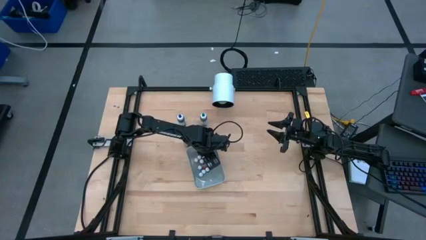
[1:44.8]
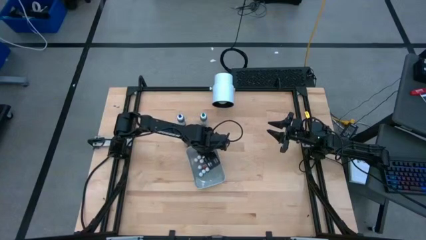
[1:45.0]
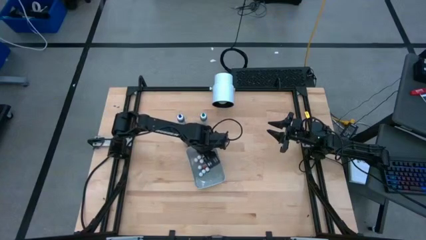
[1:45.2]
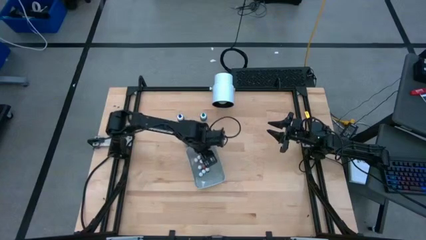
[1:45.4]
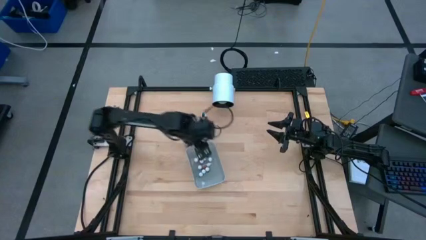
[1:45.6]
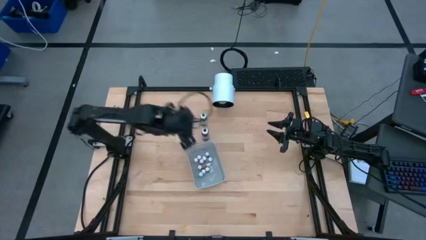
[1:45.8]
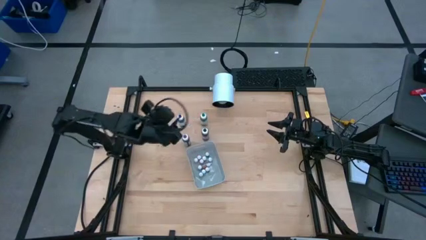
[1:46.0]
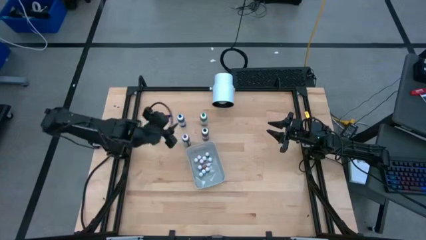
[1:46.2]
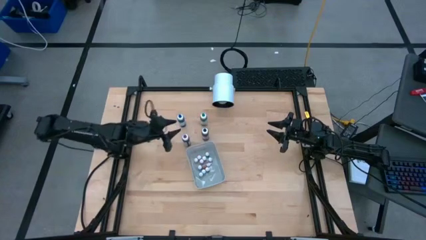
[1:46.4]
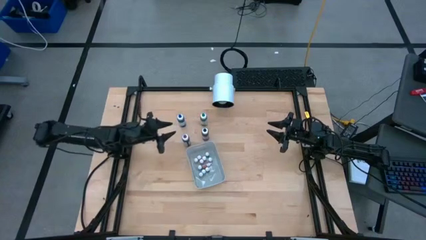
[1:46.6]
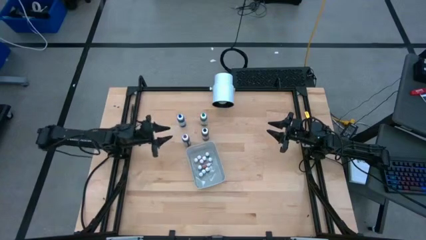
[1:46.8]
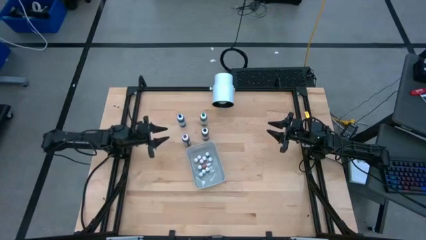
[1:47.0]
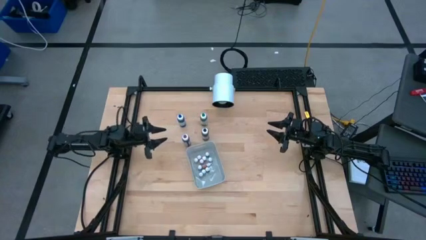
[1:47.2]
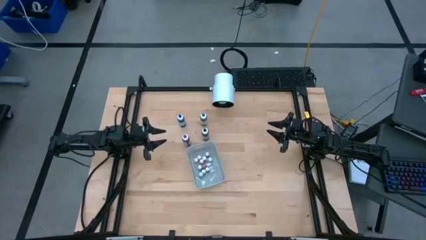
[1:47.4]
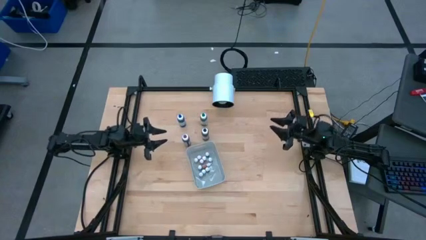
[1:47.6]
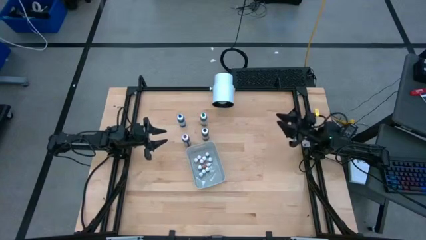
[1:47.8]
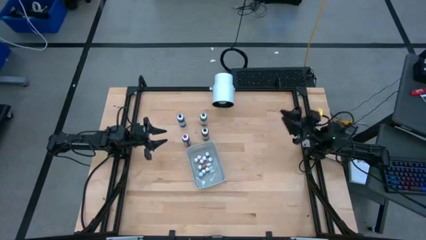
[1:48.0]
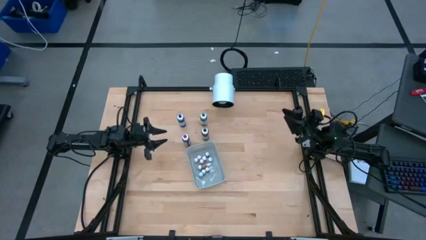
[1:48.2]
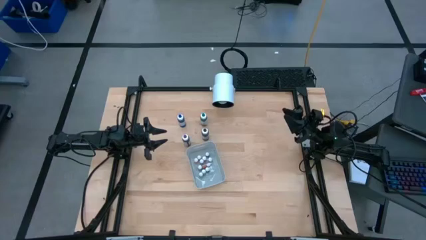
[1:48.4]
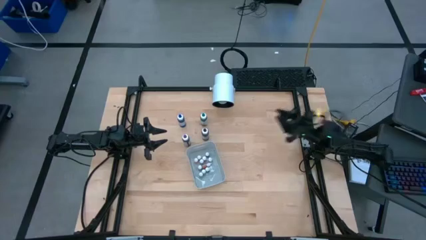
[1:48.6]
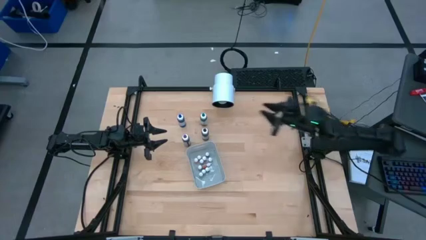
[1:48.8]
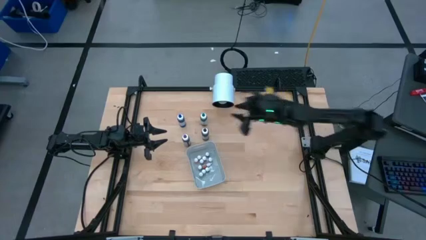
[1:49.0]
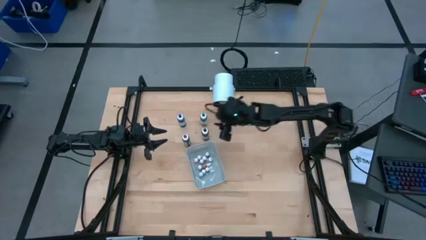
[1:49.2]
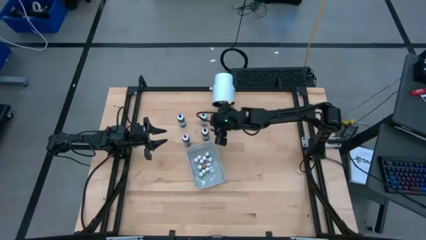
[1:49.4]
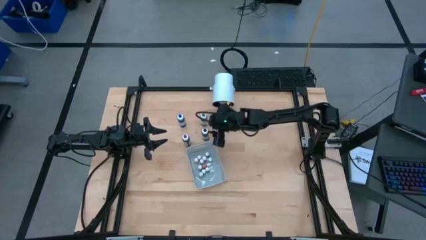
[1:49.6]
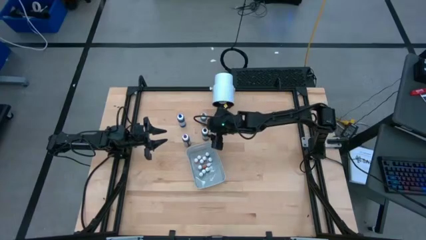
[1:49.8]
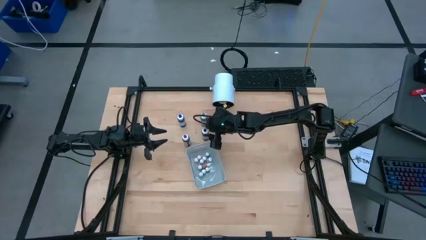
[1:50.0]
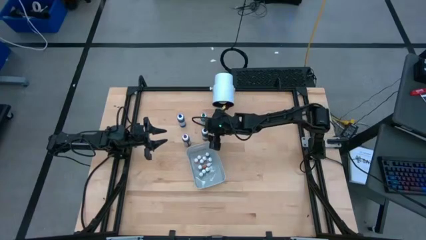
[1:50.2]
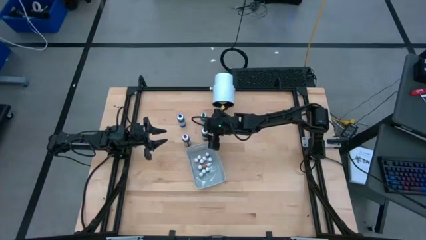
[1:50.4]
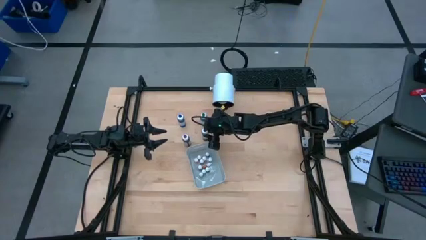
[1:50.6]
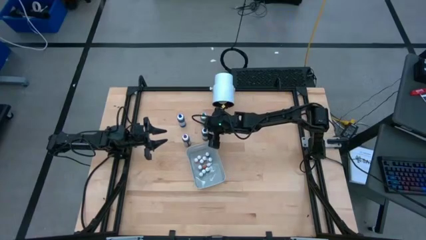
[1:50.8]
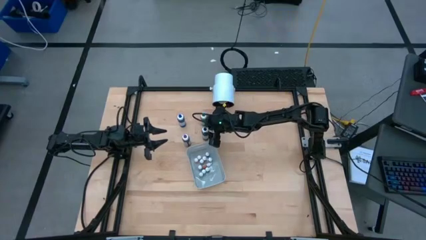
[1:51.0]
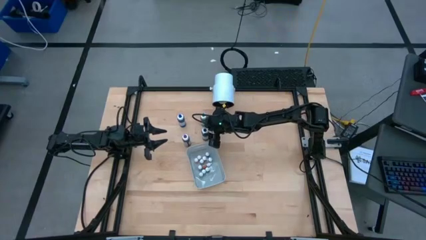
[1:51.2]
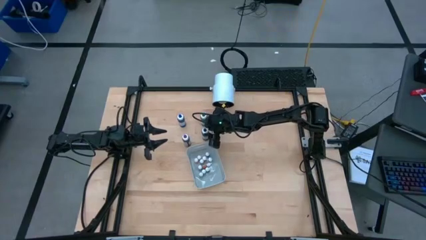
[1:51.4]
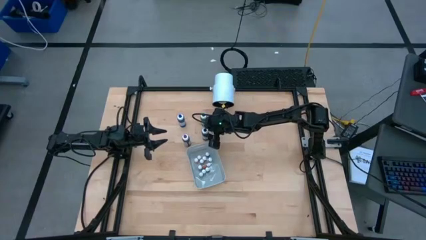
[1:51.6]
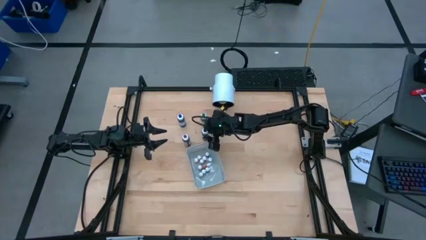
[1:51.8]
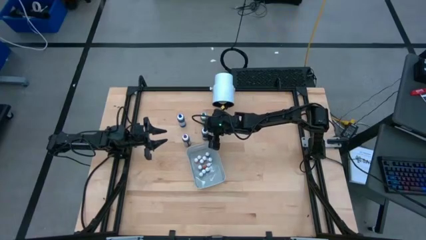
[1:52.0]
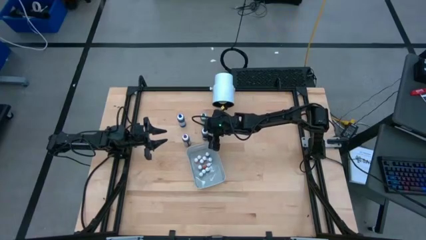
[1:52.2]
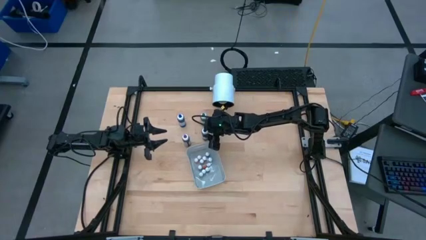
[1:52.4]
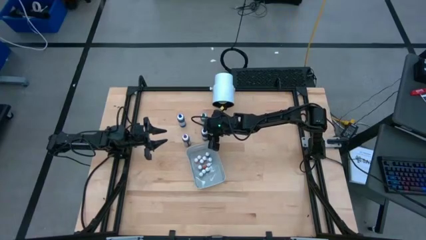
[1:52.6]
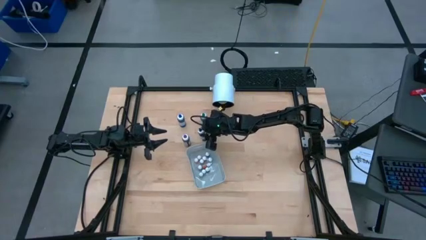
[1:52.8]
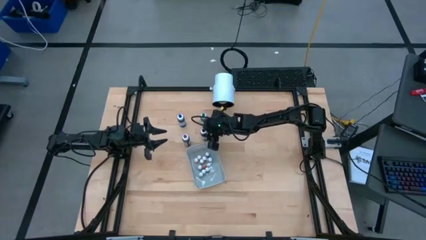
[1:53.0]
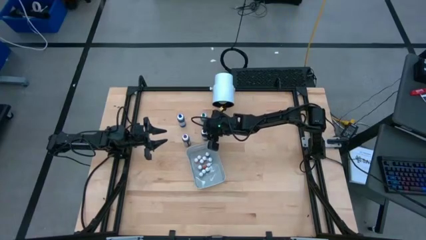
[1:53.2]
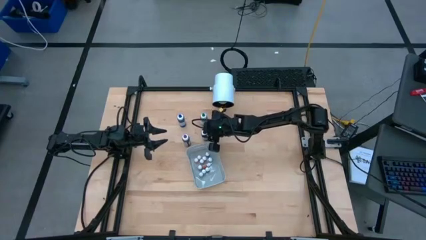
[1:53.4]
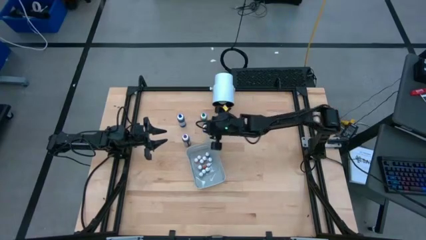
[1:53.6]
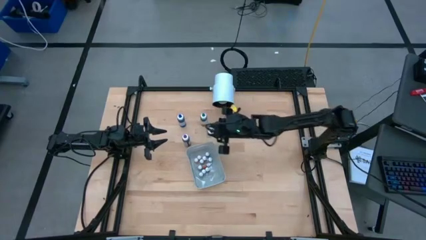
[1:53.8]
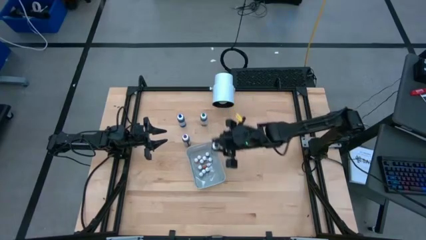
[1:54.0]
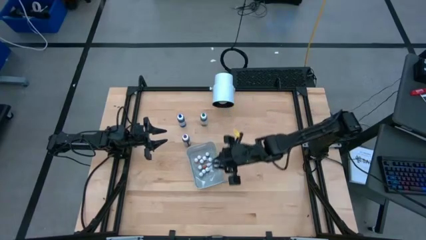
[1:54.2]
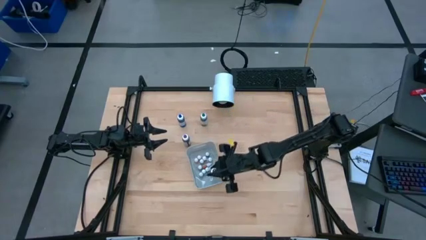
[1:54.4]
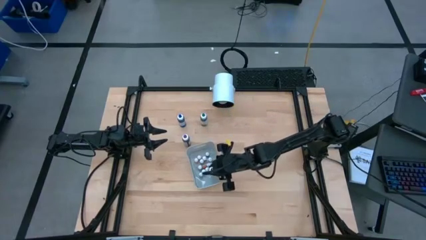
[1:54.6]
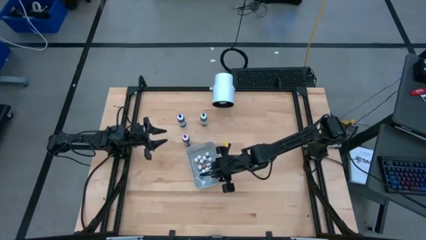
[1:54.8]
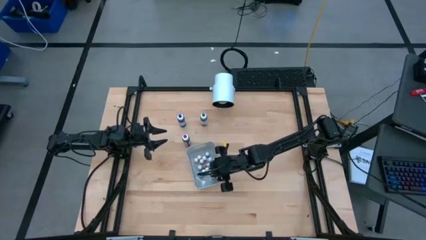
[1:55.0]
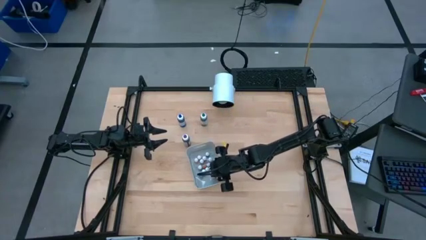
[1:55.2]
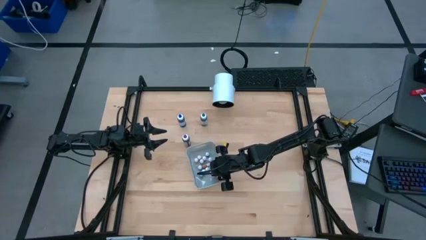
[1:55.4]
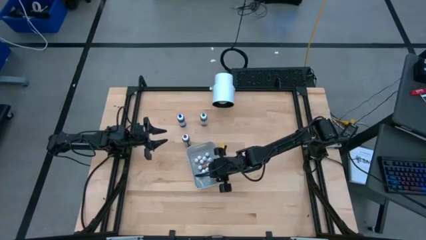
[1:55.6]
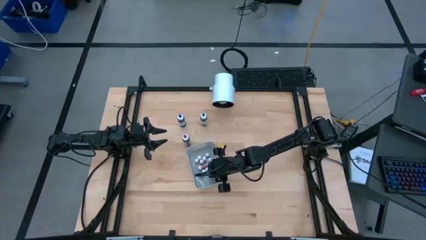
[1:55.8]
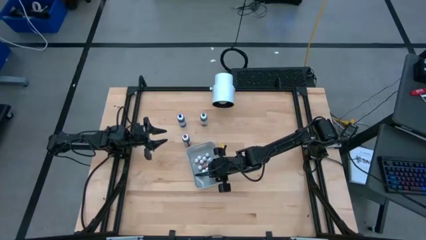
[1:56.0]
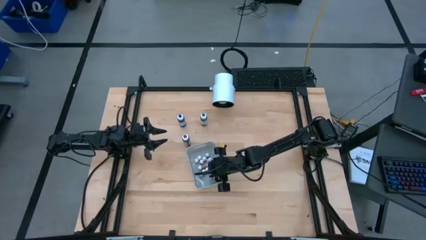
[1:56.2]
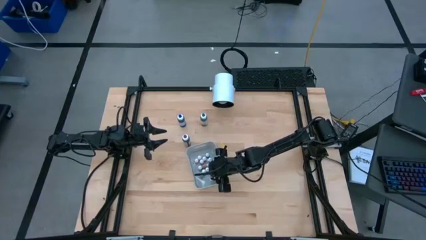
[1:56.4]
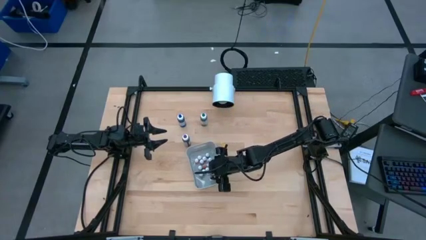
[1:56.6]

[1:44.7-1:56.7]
Task: Pick & Place food coloring
Put the large black food coloring bottle into the gray bin

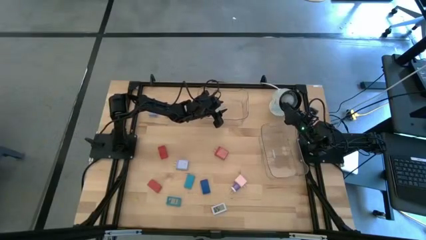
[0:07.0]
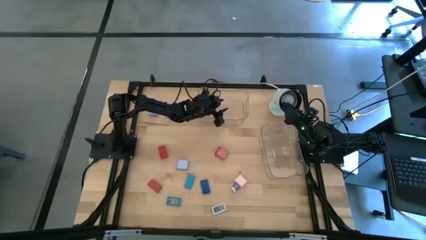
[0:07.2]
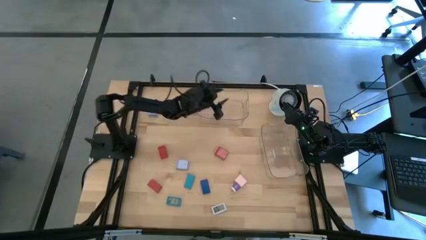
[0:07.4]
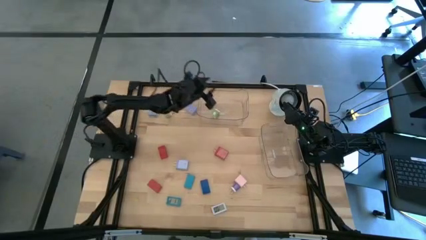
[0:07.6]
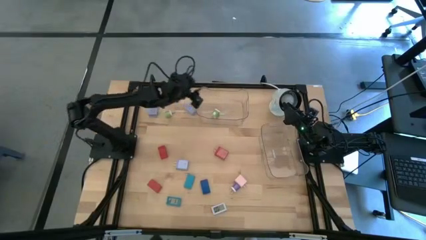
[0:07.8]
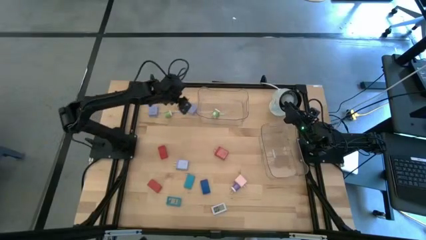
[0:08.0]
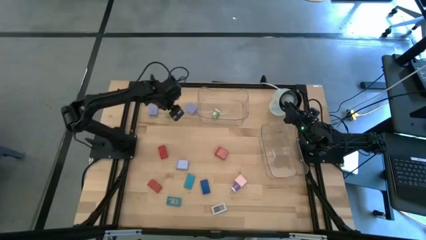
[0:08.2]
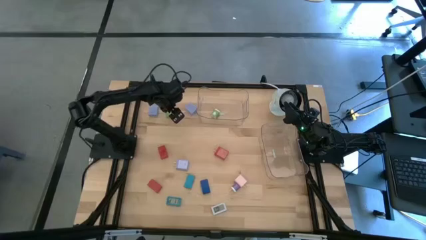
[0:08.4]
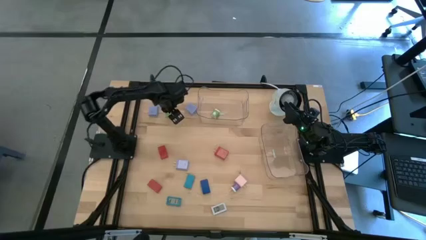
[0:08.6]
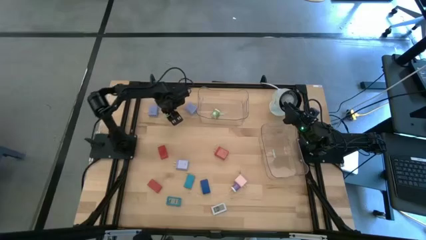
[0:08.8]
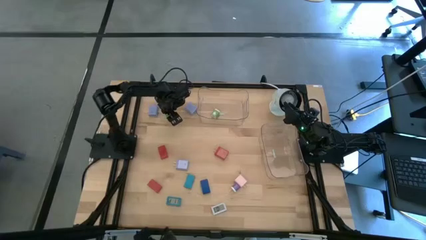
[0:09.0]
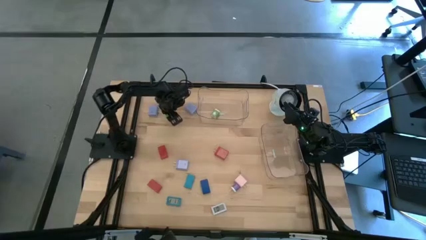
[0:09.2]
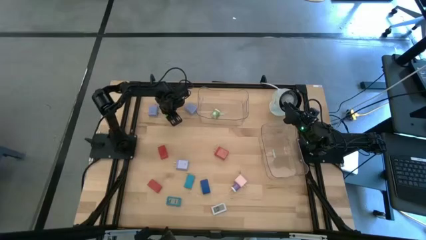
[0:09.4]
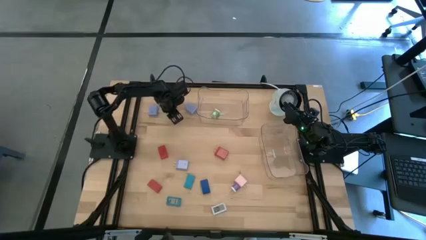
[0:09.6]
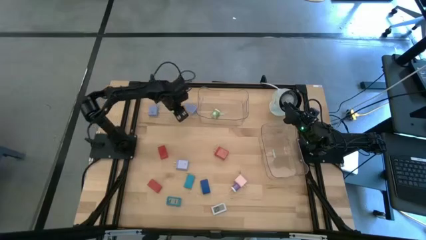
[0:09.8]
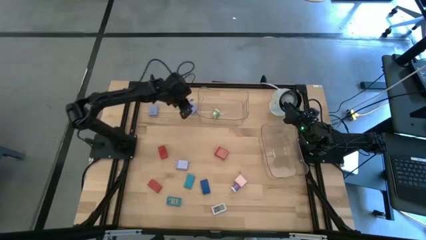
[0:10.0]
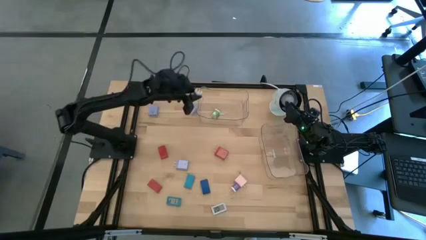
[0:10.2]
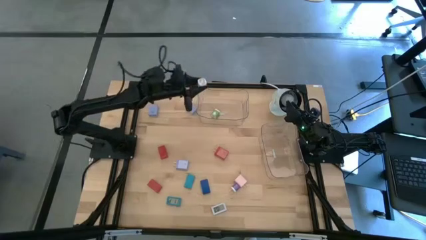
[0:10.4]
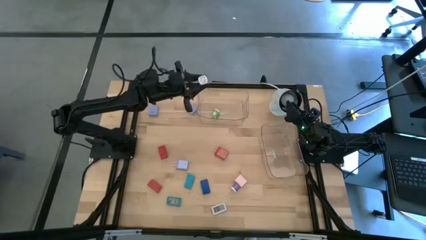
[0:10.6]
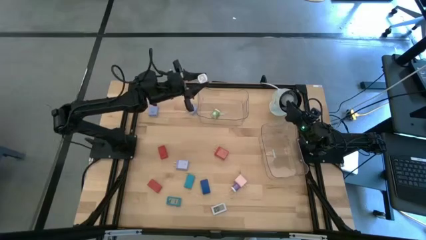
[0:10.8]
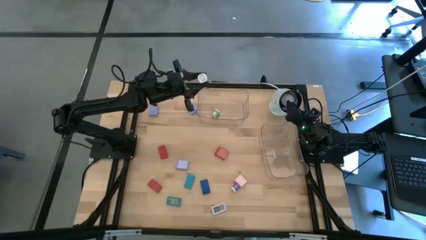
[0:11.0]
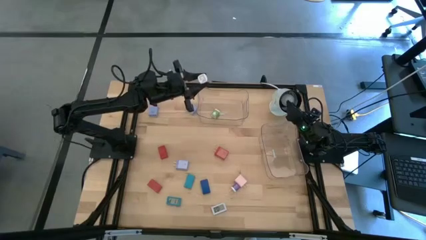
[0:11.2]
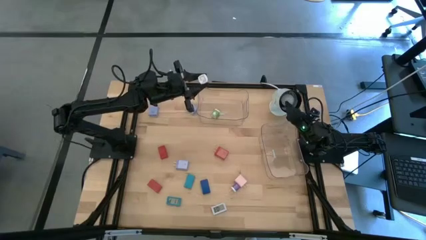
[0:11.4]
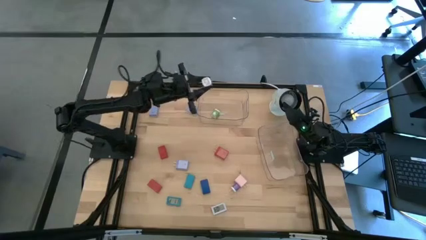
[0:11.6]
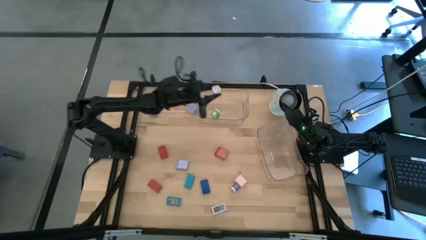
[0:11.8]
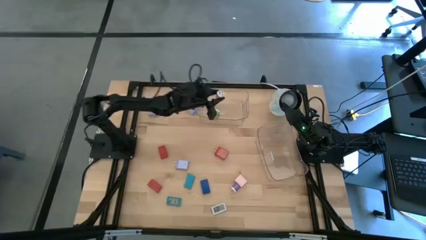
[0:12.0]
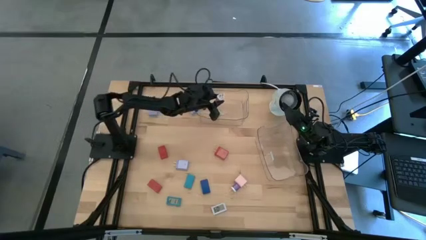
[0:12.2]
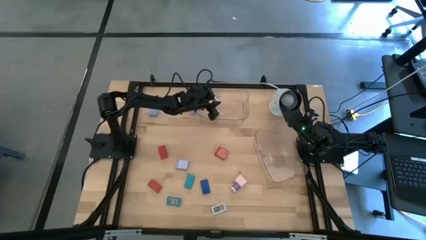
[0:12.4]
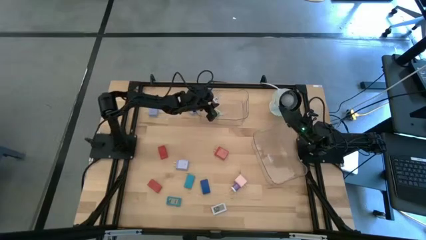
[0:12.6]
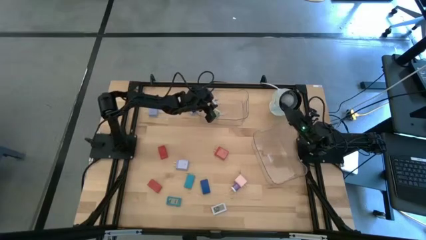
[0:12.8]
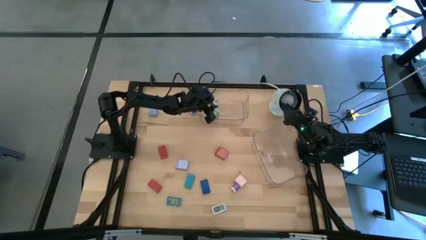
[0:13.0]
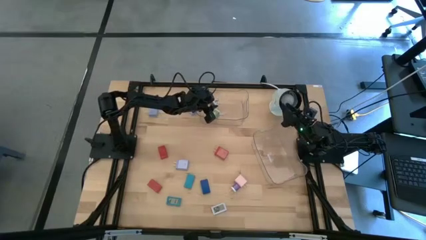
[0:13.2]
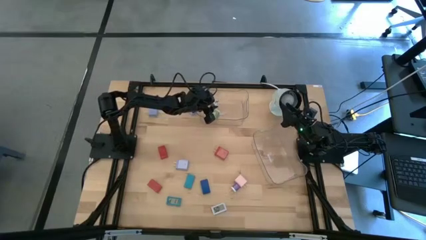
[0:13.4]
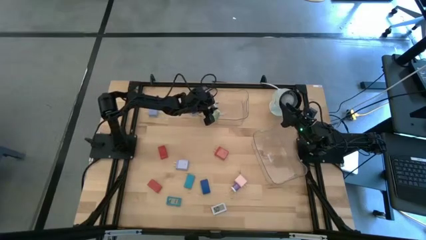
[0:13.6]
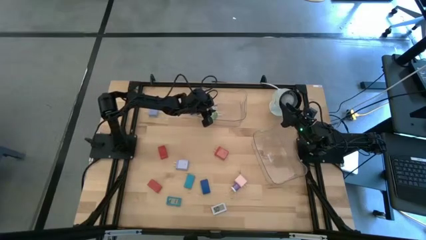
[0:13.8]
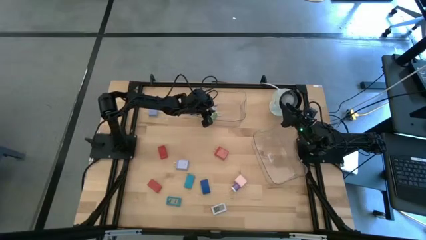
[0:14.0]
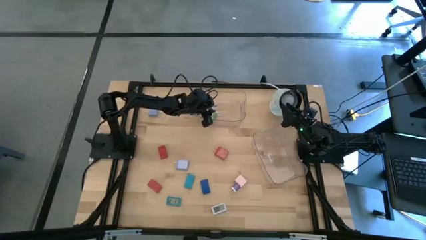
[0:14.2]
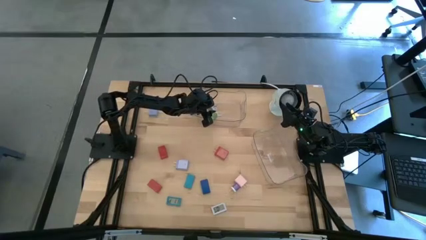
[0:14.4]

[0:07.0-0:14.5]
Task: Pick & Place Office items
Put the small green charger adapter into the top transparent bin
